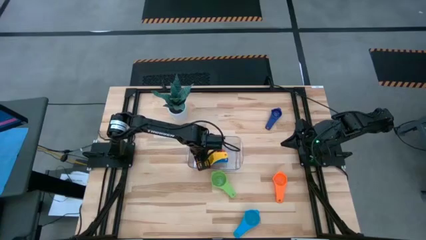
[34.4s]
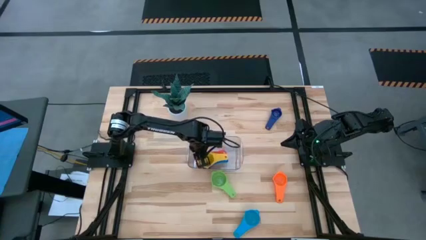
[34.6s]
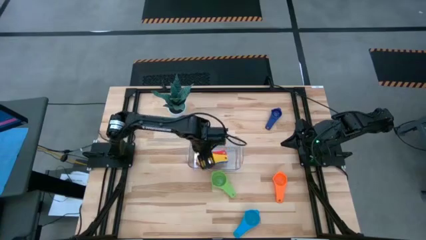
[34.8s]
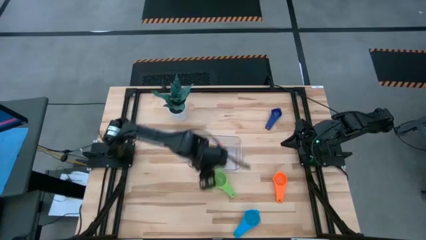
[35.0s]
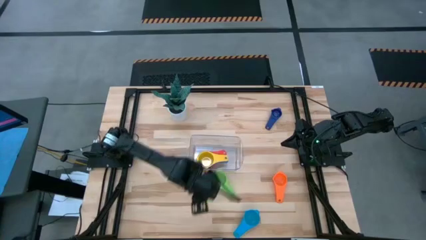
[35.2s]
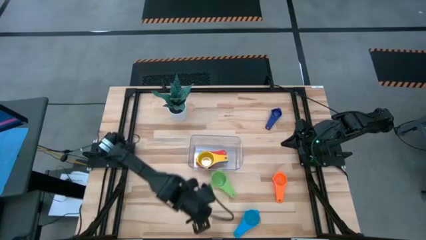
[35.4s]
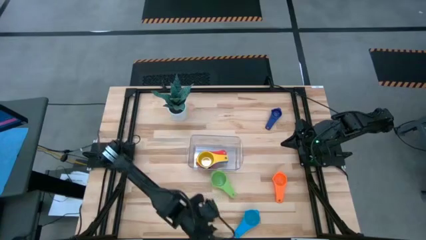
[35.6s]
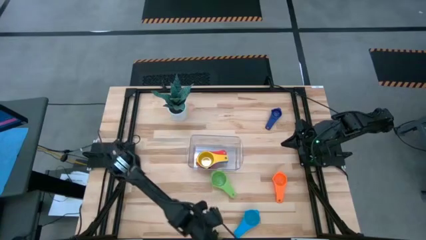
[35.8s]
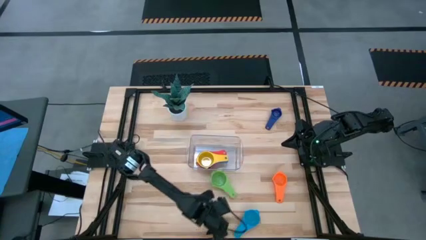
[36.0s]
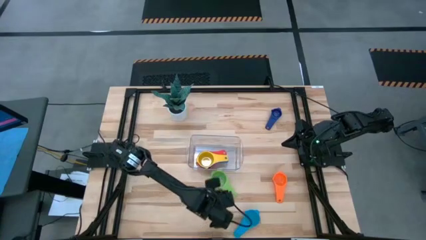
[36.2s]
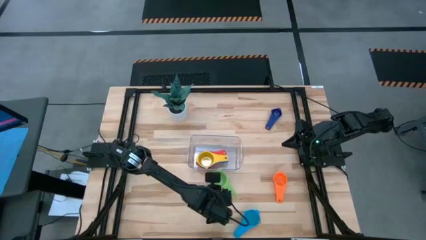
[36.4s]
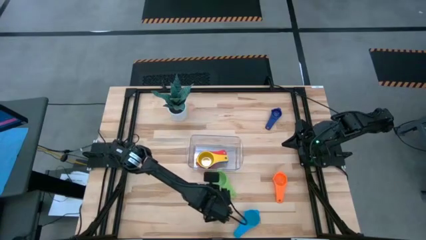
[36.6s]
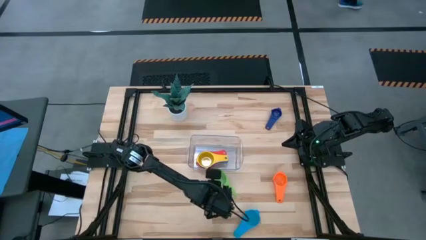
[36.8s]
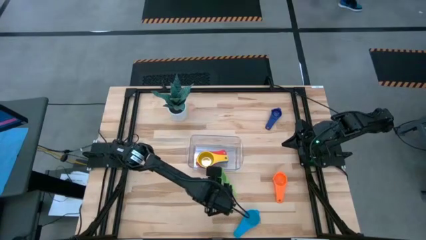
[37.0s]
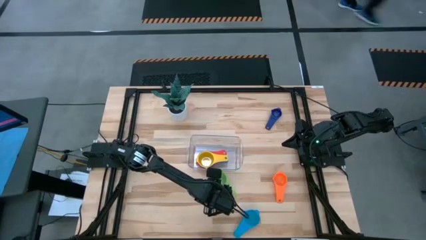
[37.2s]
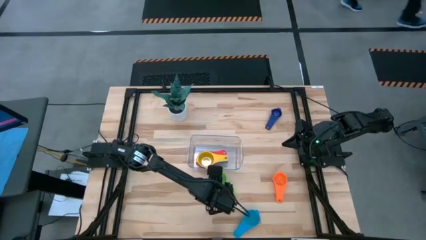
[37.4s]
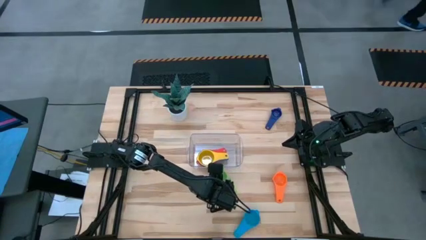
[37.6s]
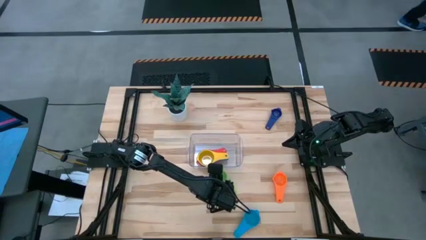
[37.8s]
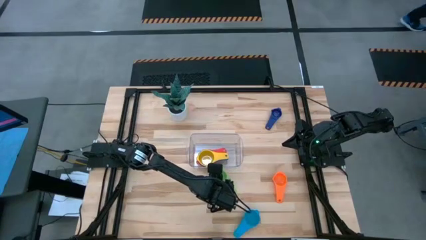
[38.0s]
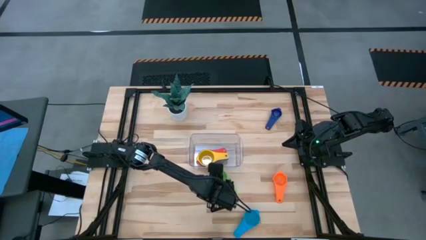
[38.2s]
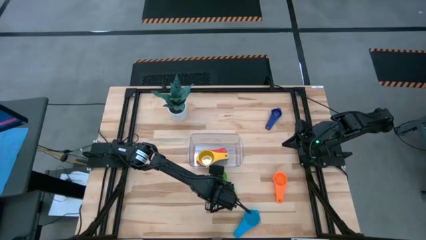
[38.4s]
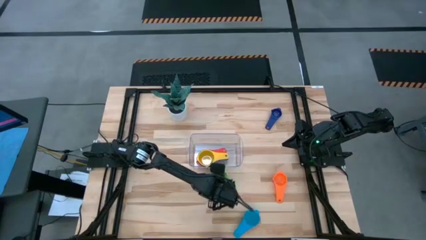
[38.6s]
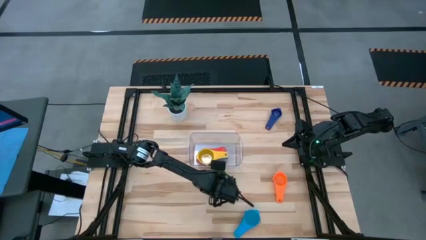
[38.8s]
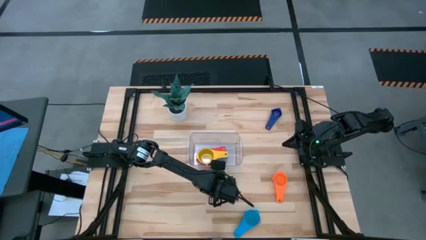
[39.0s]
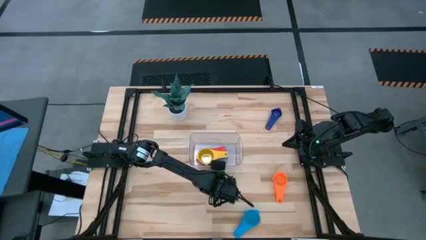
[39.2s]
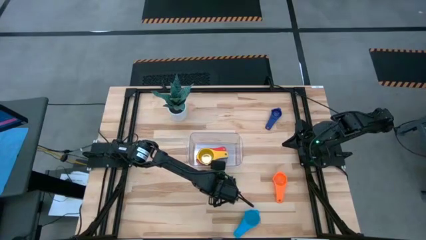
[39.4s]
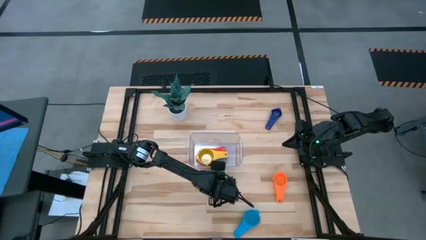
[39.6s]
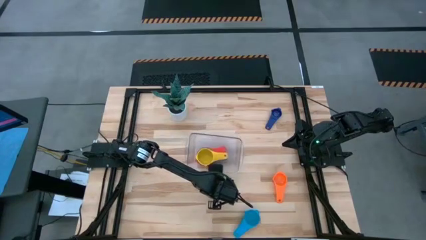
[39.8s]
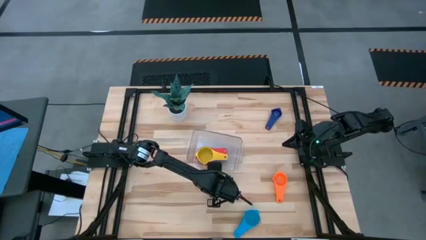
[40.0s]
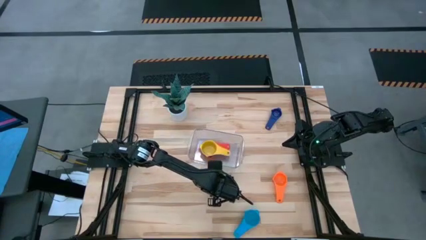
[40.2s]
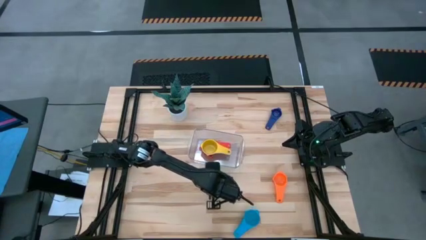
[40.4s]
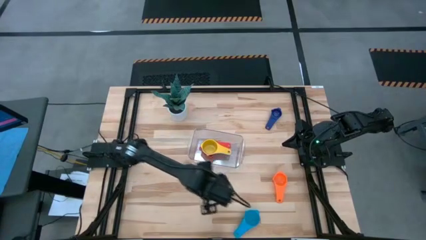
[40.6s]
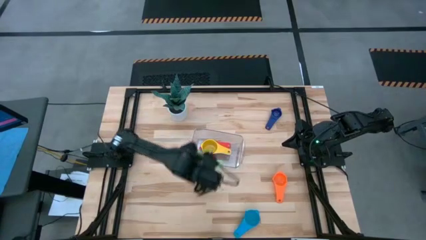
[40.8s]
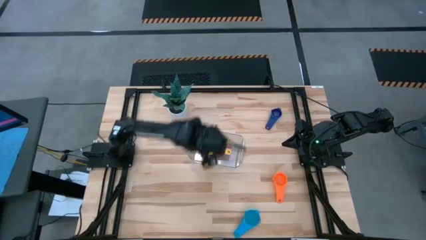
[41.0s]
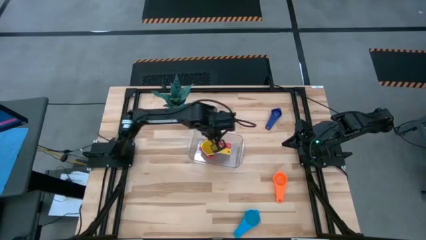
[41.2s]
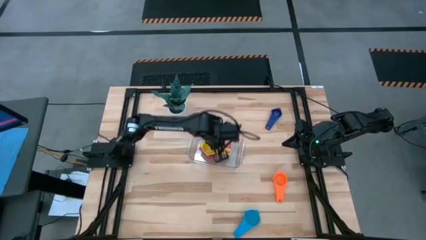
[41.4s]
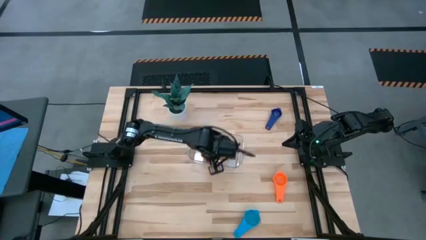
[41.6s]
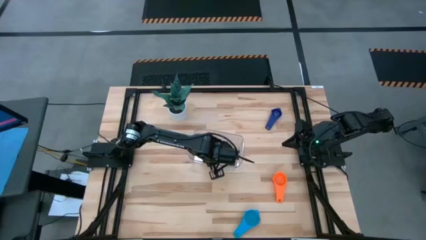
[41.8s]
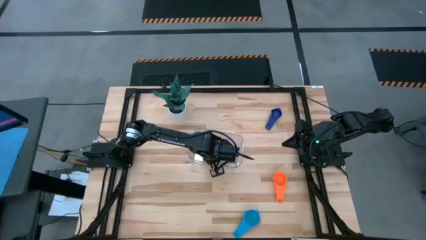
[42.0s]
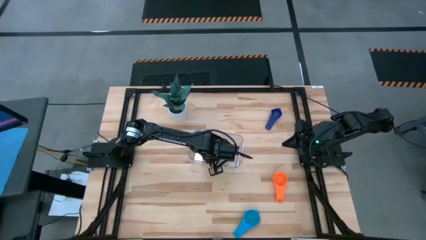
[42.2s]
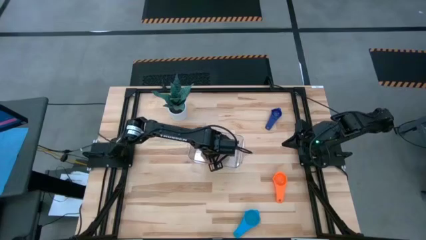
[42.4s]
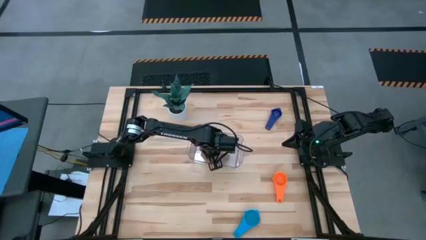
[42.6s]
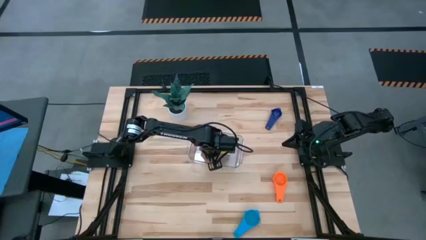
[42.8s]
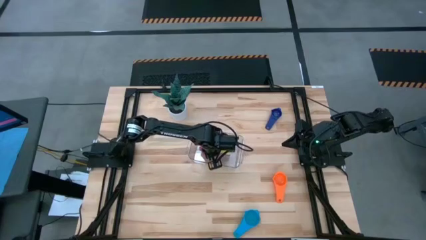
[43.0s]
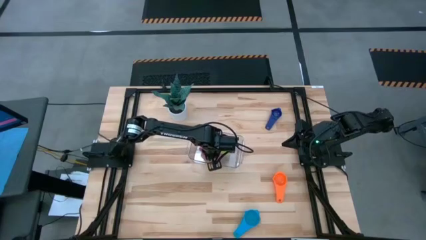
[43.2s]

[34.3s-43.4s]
Task: Nest measuring cups in basket
Stack the green measuring cup into the yellow measuring cup

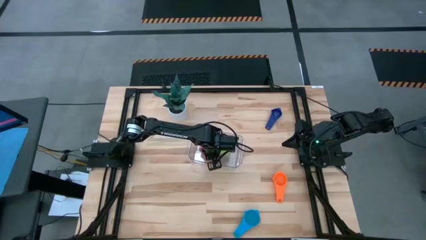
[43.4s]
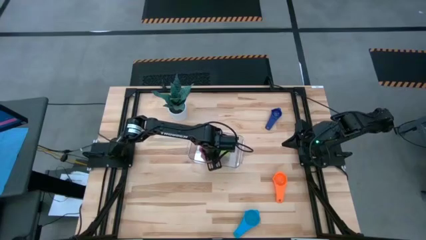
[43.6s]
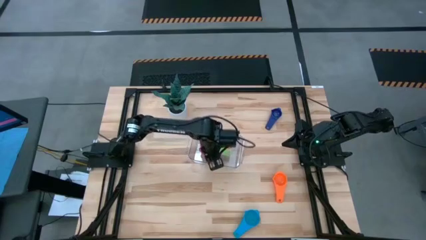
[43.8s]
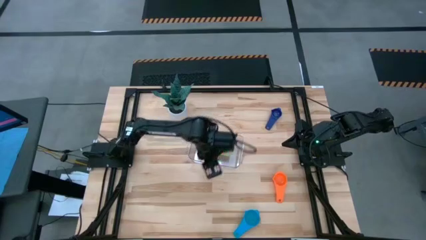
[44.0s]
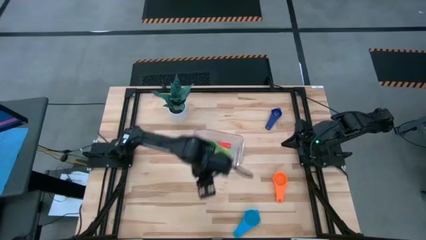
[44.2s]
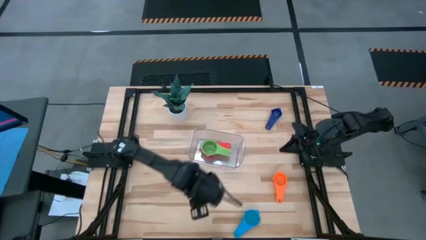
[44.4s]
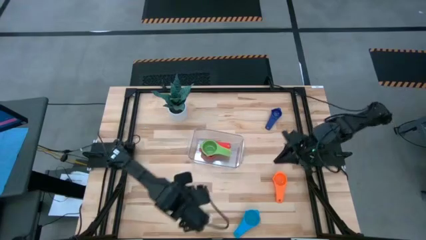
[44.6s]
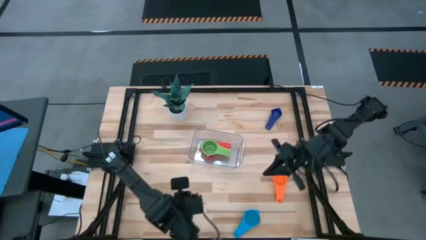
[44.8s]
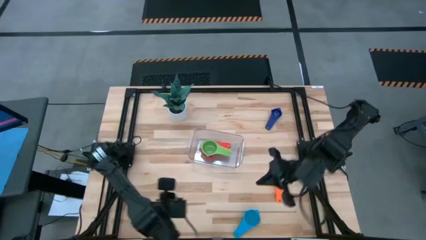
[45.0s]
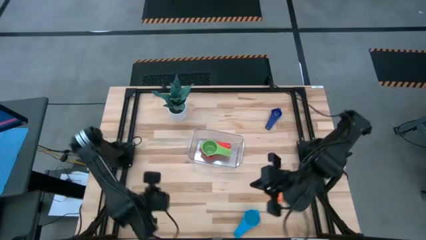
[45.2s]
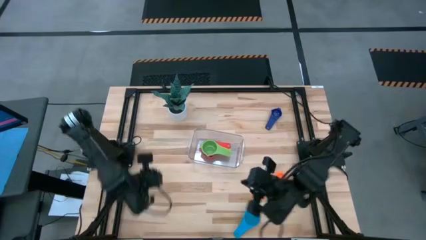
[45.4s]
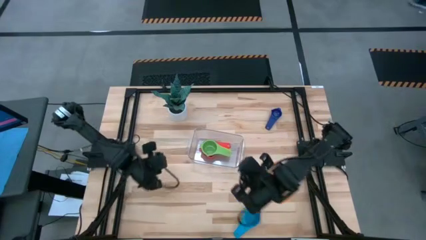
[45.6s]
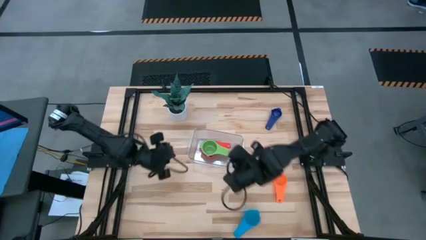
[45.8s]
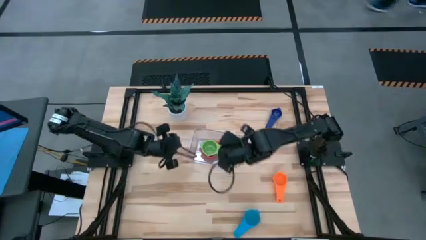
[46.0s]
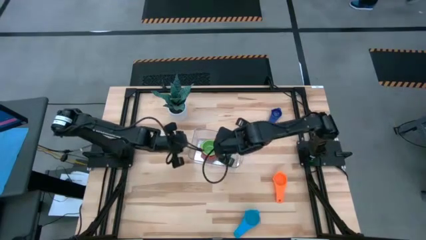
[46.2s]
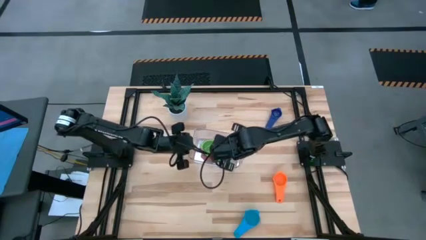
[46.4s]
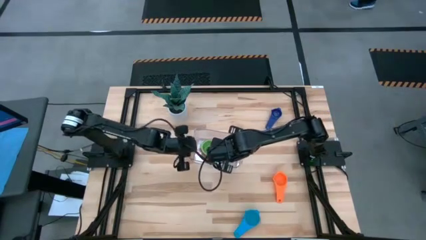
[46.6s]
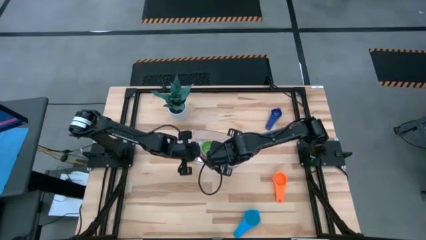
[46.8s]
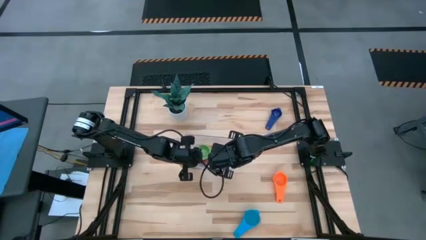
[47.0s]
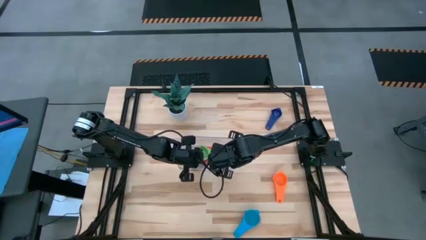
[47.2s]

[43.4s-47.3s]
Adjust the transparent bin
